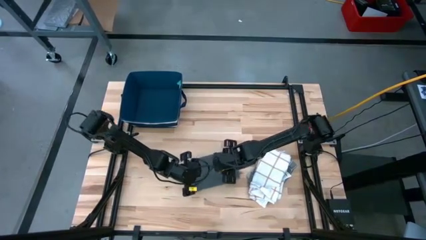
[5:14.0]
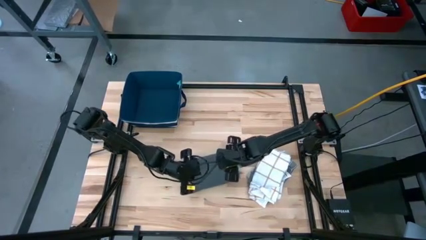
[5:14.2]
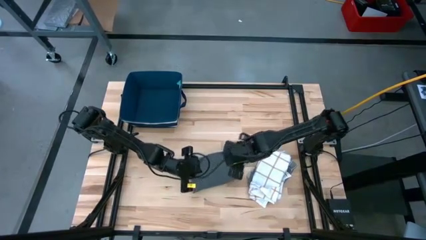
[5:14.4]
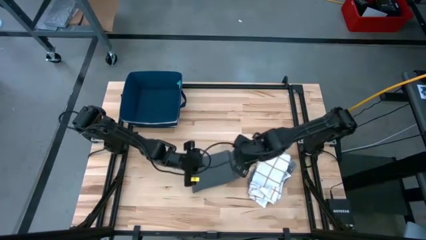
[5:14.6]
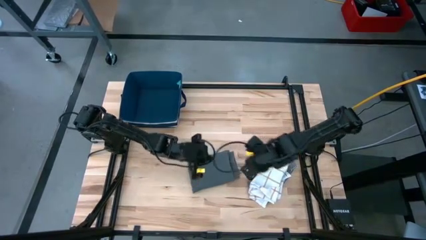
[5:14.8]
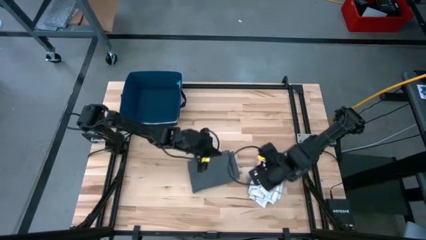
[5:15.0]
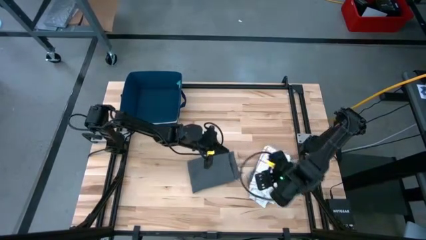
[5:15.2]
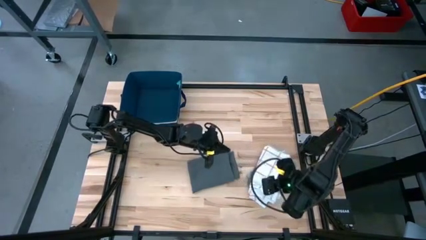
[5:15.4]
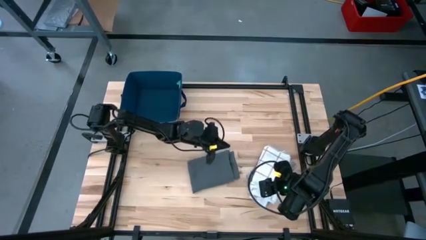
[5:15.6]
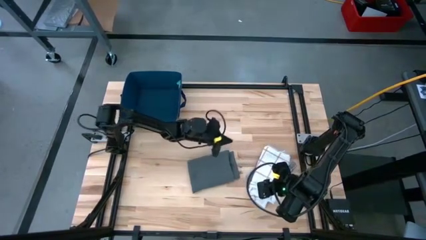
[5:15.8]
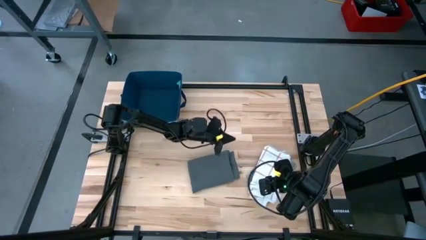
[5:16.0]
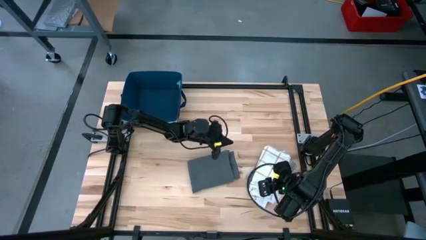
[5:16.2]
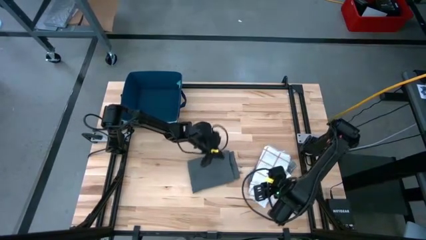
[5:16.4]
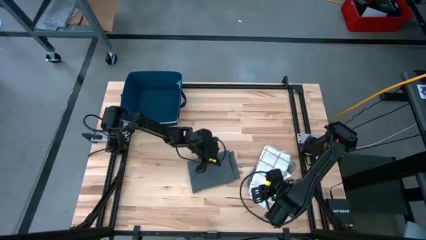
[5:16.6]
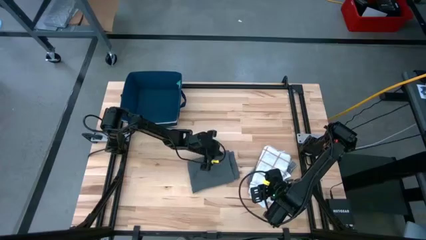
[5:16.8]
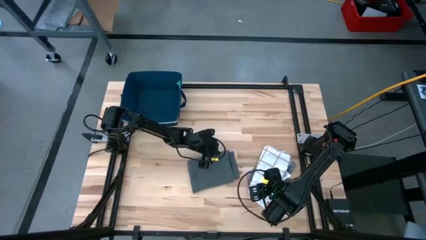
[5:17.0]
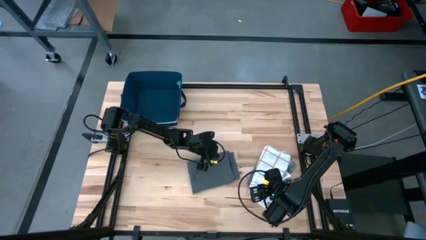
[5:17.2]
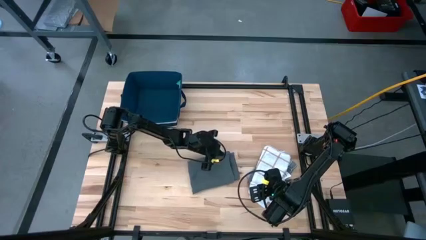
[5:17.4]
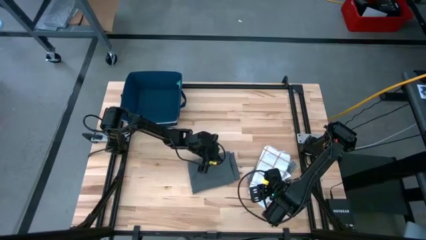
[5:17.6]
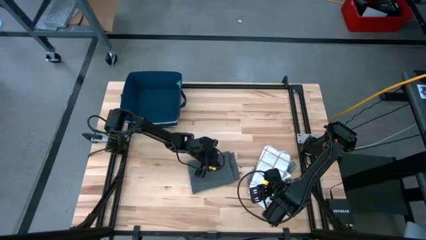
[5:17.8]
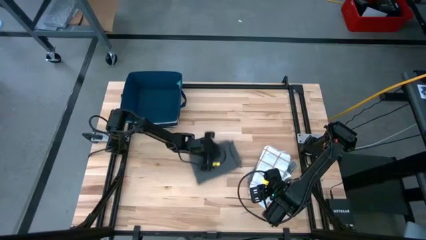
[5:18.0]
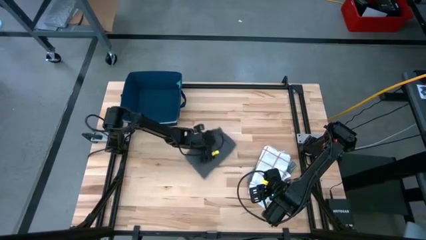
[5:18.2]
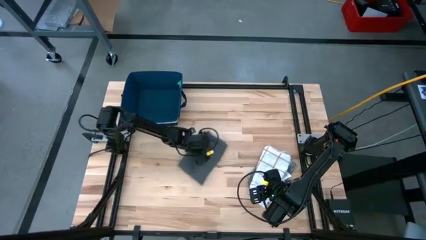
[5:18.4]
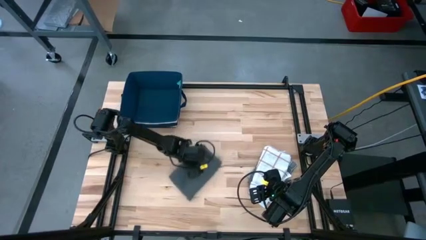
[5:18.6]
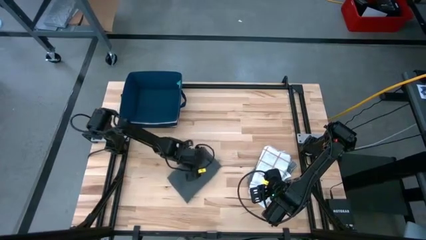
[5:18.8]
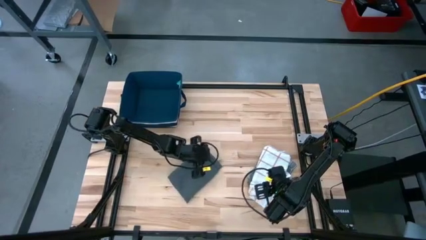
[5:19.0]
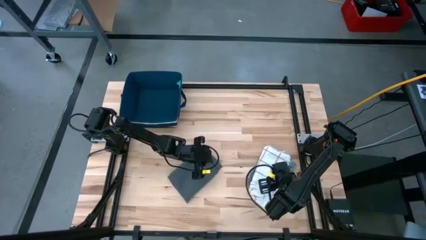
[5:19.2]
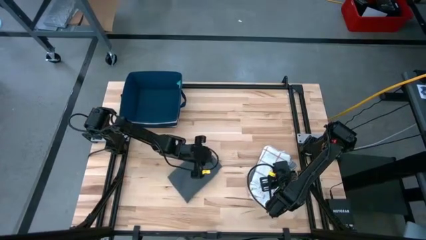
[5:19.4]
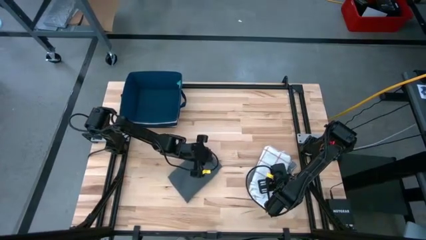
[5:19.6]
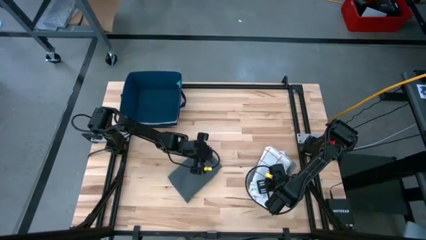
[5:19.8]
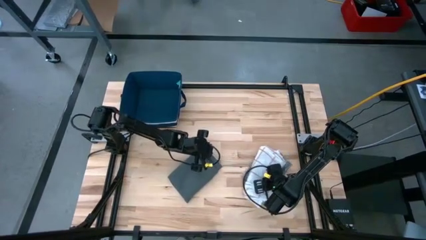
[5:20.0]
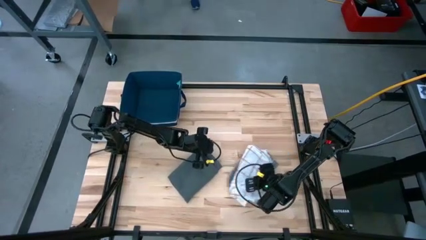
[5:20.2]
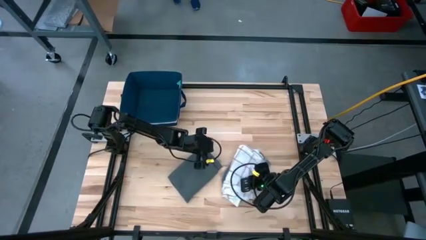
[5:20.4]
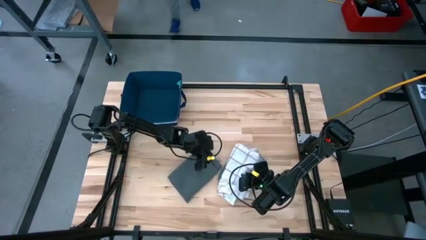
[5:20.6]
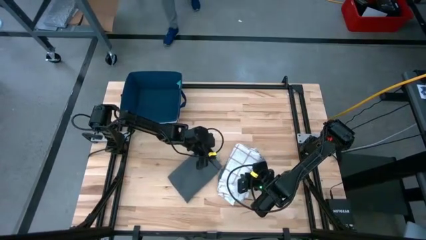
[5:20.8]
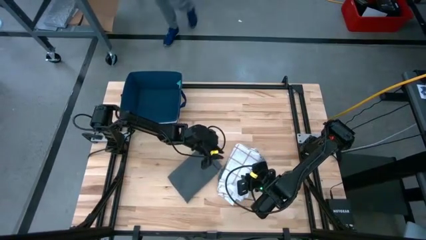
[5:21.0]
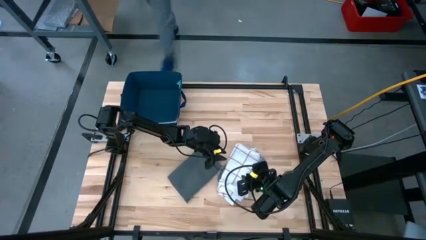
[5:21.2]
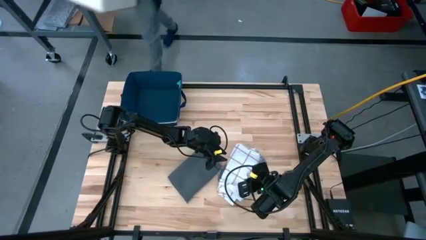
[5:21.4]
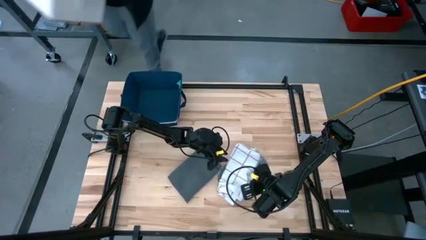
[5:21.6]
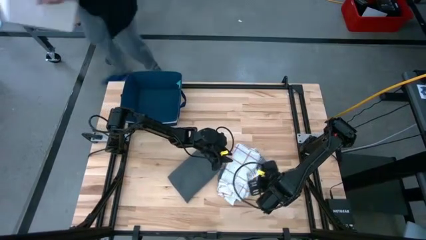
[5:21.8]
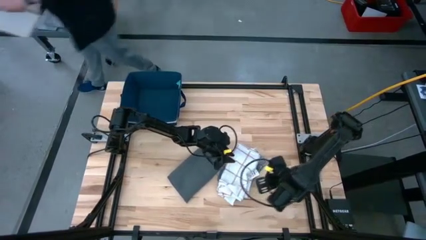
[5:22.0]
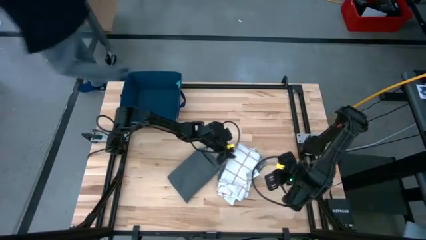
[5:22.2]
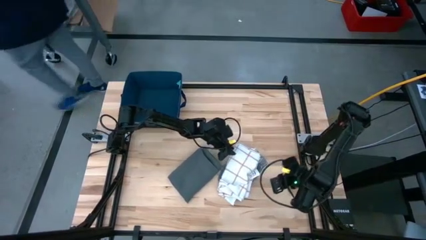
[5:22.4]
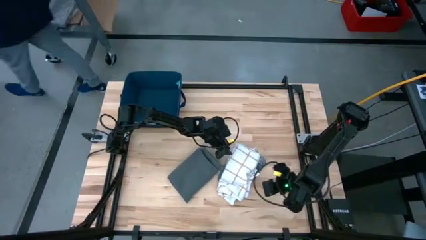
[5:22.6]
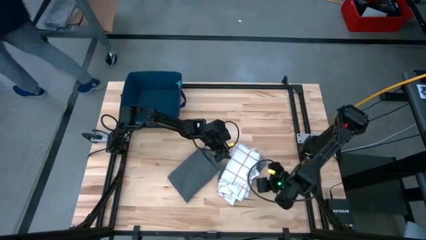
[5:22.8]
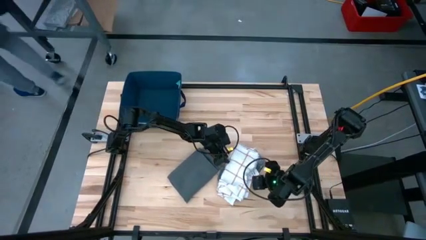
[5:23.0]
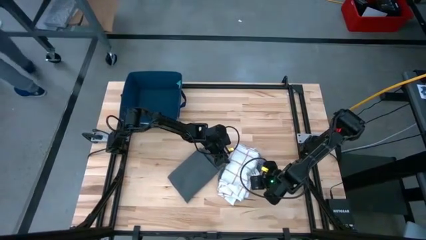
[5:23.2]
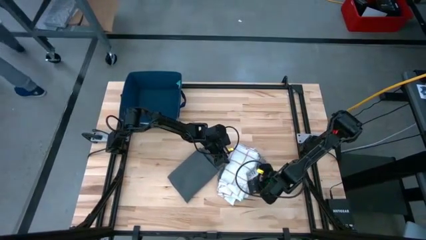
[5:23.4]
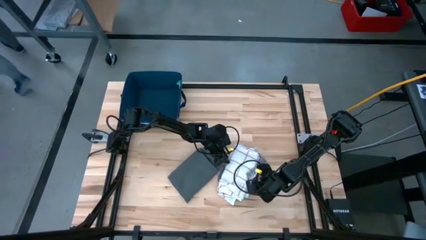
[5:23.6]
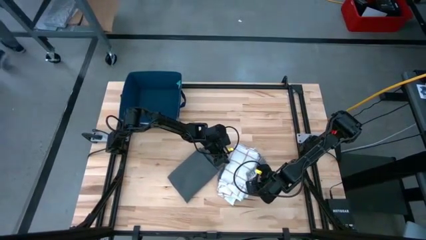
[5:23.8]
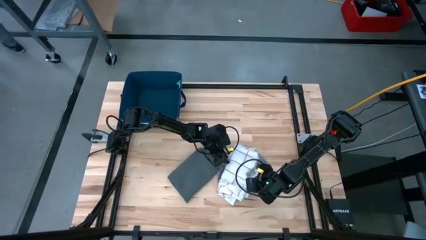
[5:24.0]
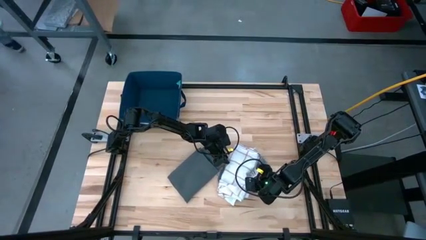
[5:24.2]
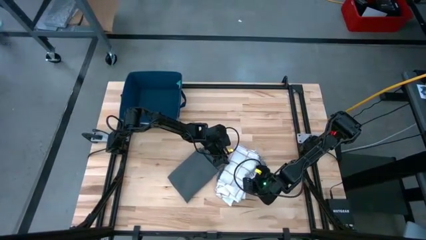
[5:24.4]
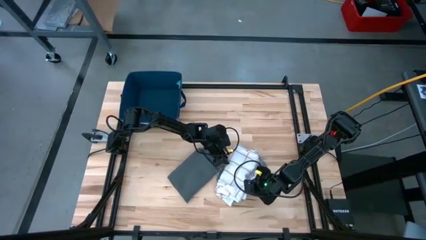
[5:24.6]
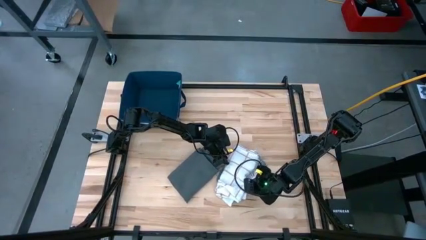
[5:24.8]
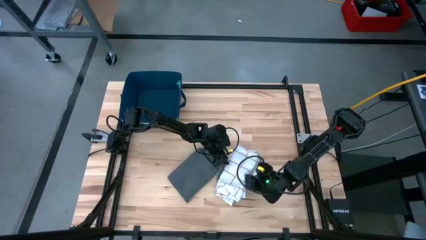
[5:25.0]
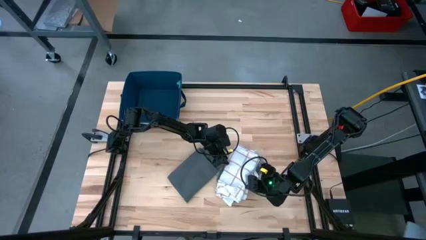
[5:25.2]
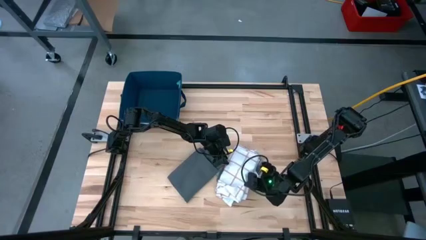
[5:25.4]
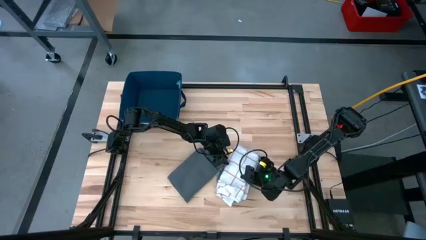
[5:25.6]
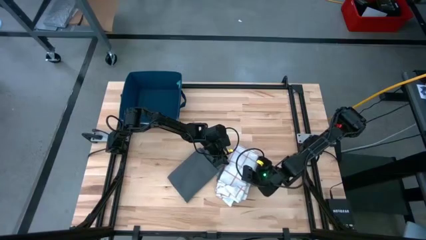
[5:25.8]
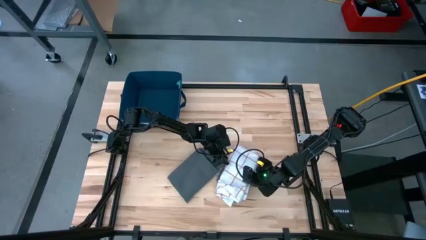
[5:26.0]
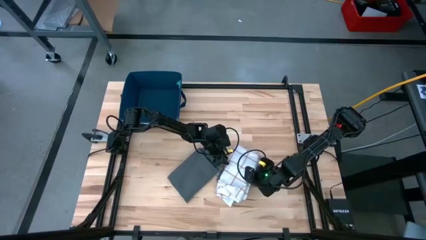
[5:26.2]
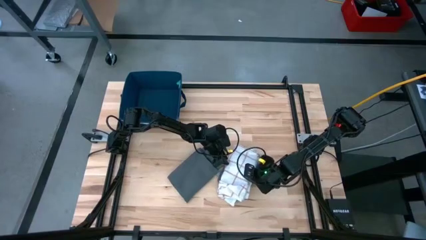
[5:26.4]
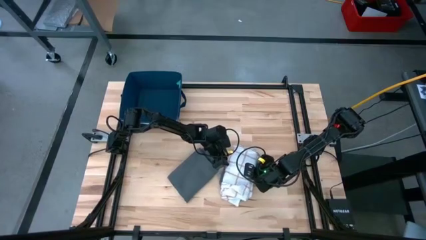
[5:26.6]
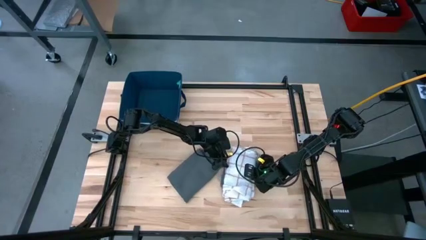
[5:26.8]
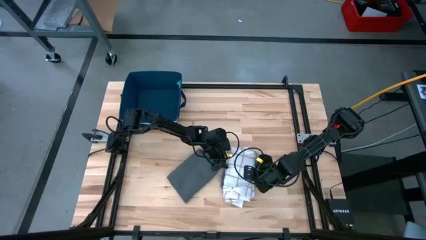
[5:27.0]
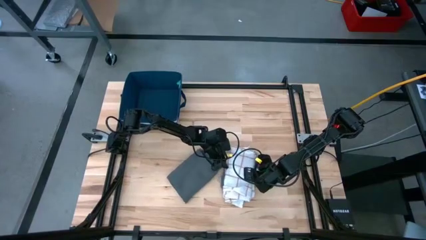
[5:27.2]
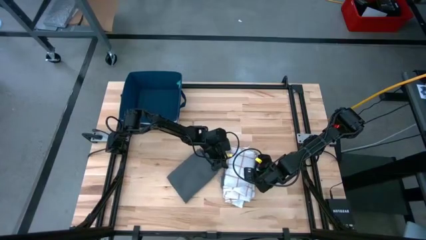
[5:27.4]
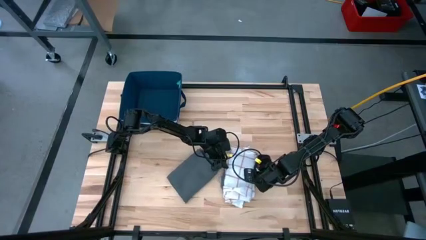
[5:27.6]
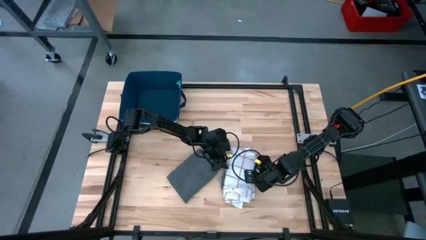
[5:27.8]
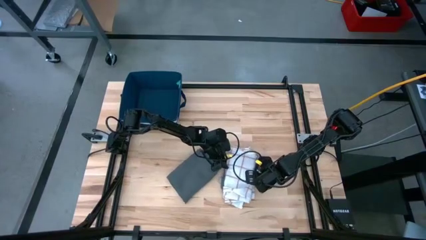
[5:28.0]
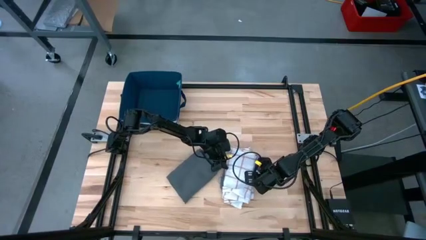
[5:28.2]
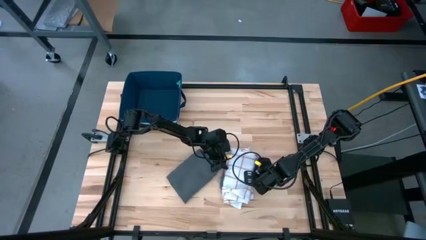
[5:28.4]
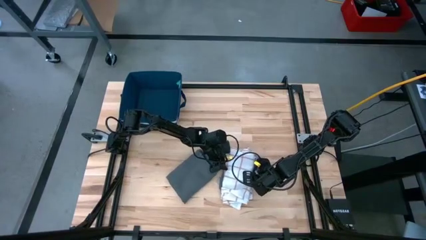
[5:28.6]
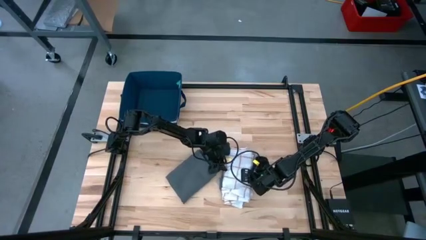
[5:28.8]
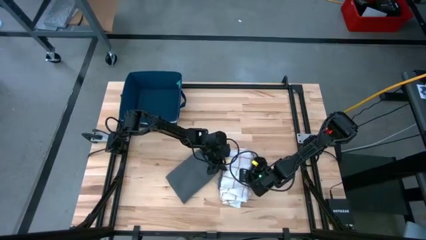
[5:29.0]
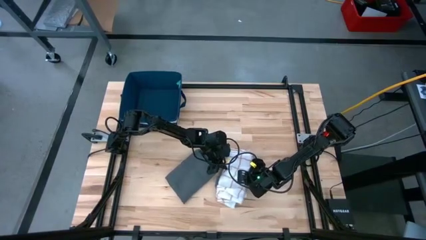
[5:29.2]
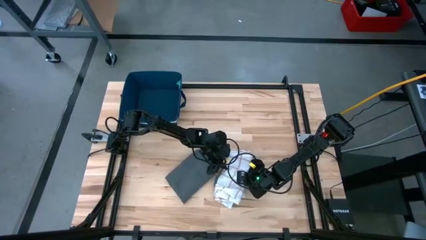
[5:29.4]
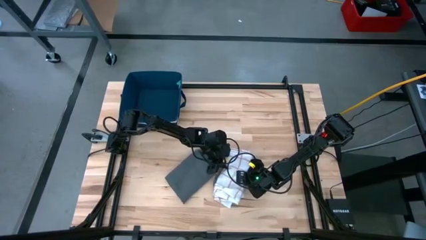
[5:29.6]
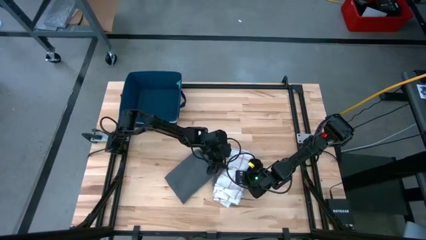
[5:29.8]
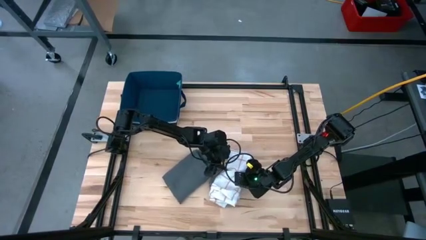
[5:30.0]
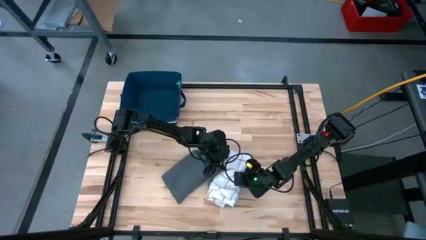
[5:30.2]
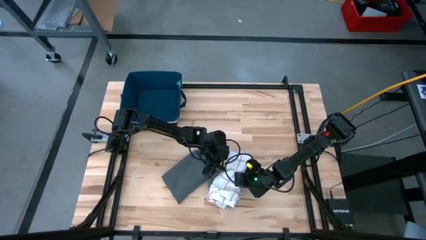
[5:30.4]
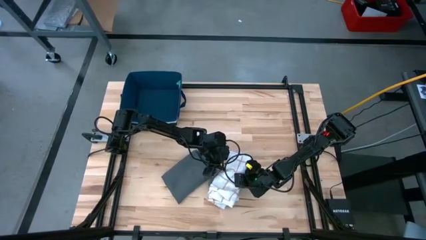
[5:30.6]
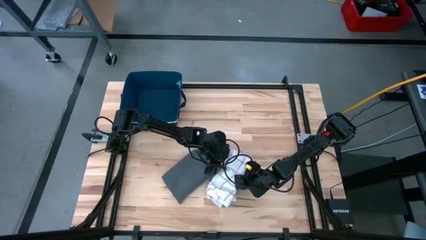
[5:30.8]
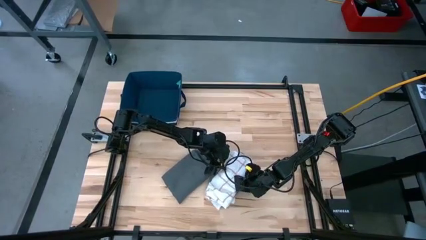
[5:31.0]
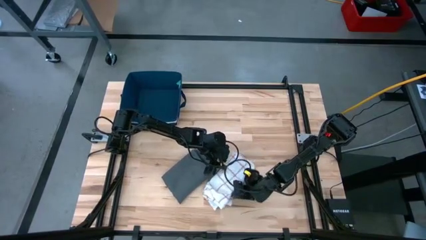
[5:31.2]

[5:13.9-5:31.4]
Task: Fold towel
Stack the stacked towels on top of the gray towel
